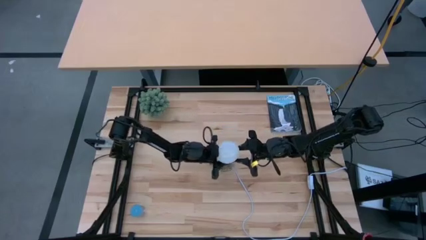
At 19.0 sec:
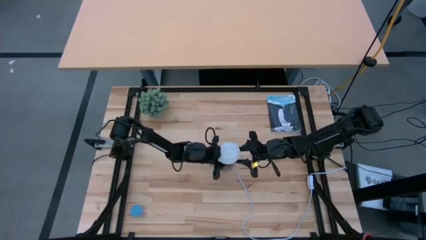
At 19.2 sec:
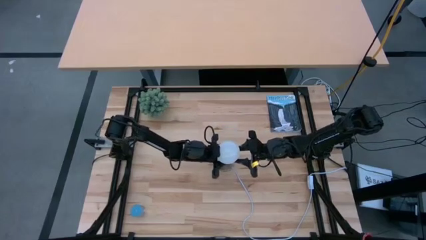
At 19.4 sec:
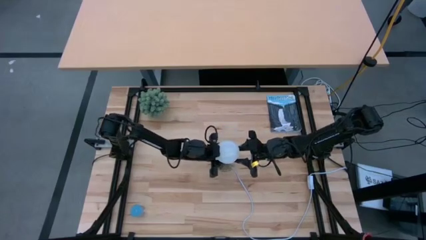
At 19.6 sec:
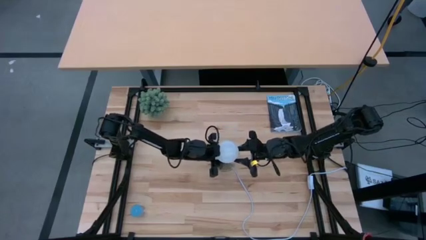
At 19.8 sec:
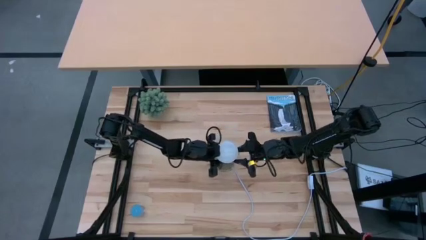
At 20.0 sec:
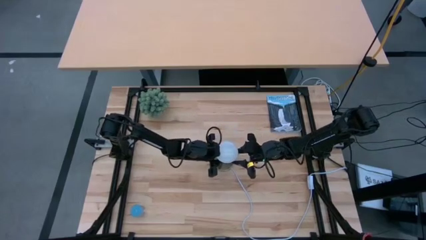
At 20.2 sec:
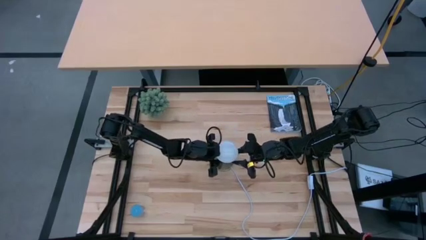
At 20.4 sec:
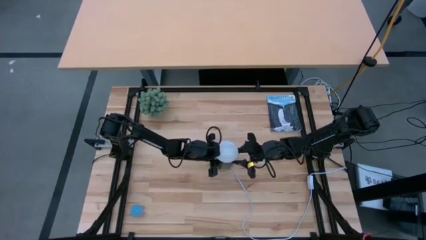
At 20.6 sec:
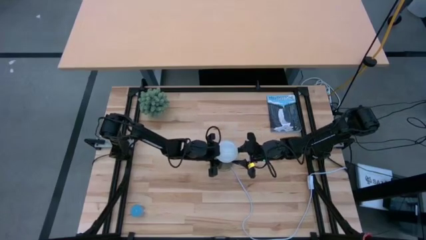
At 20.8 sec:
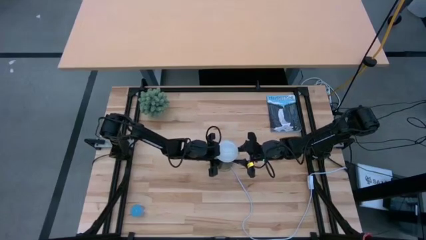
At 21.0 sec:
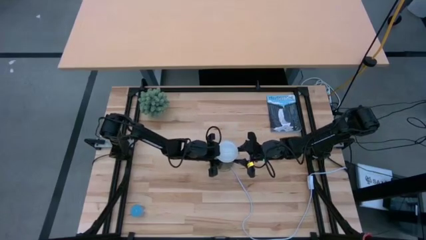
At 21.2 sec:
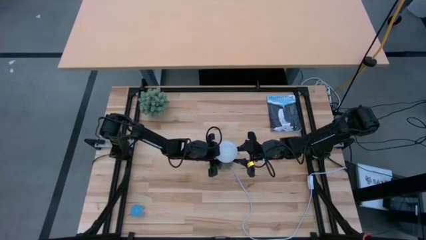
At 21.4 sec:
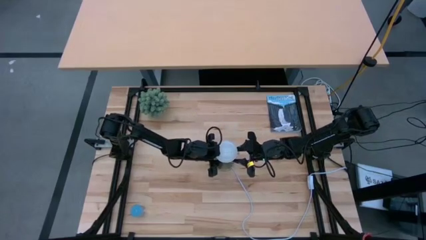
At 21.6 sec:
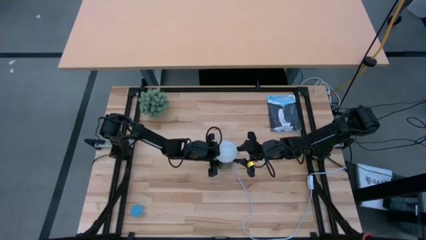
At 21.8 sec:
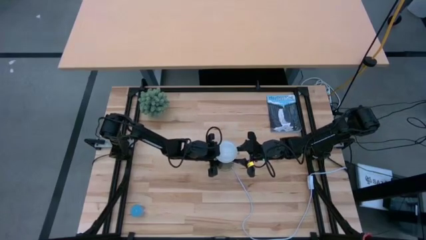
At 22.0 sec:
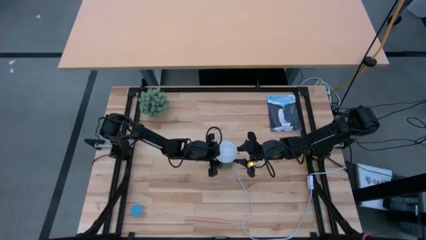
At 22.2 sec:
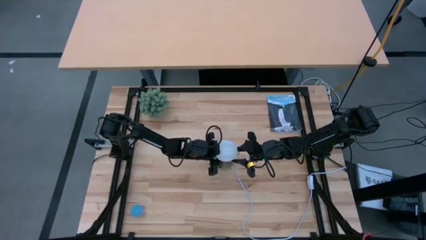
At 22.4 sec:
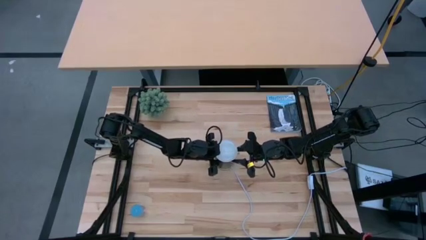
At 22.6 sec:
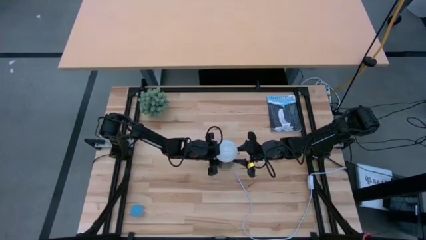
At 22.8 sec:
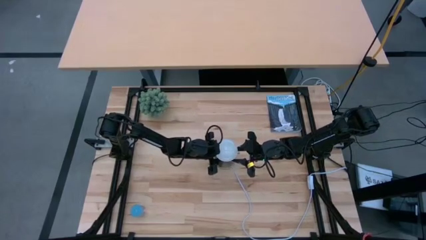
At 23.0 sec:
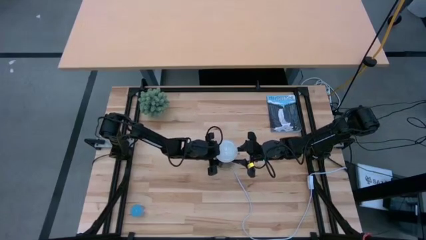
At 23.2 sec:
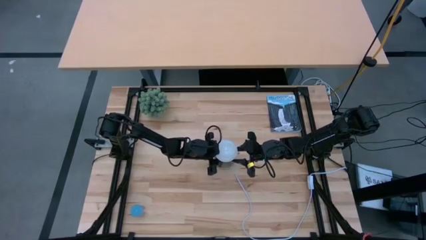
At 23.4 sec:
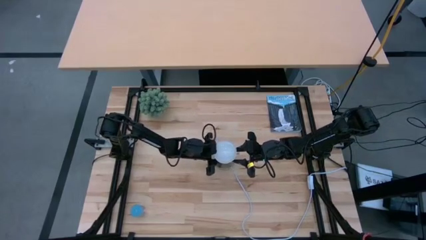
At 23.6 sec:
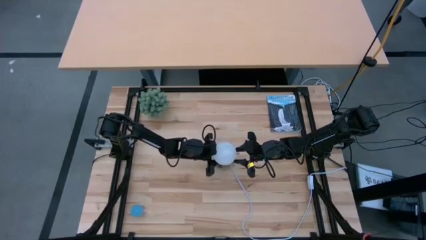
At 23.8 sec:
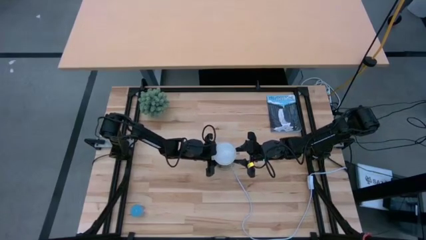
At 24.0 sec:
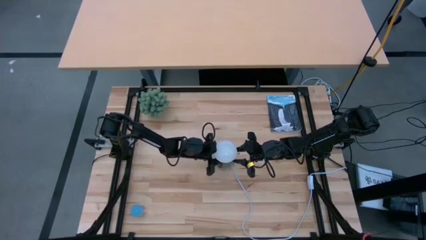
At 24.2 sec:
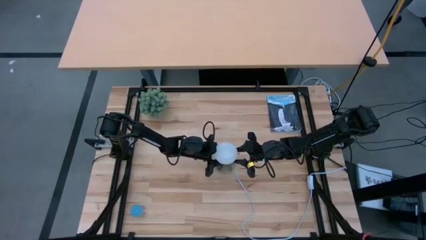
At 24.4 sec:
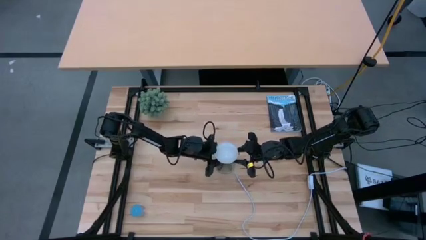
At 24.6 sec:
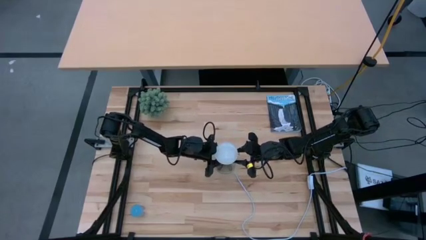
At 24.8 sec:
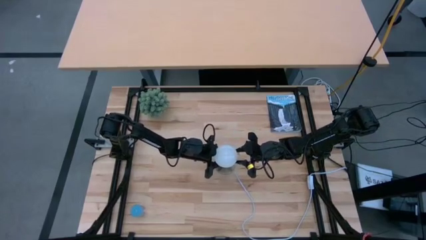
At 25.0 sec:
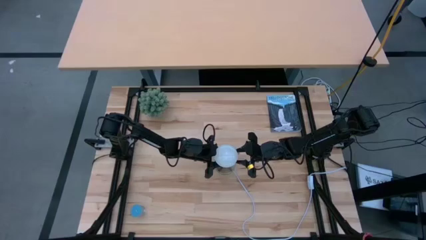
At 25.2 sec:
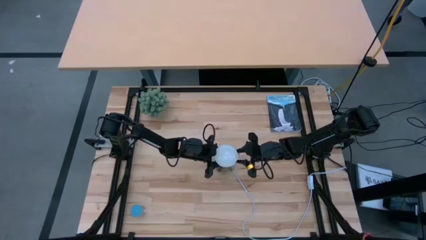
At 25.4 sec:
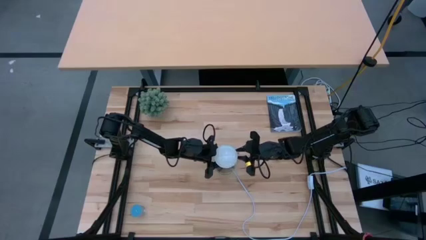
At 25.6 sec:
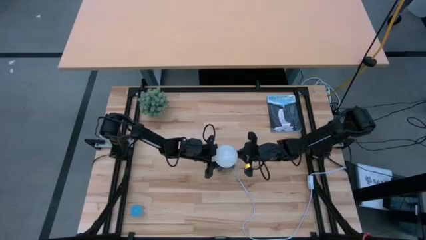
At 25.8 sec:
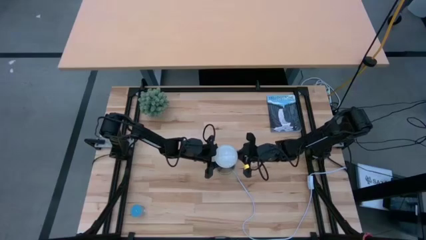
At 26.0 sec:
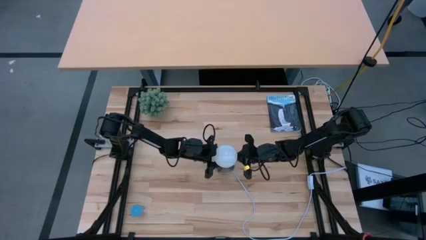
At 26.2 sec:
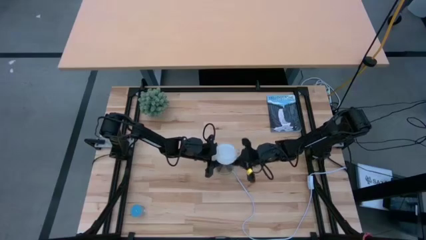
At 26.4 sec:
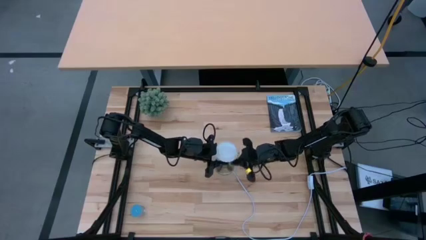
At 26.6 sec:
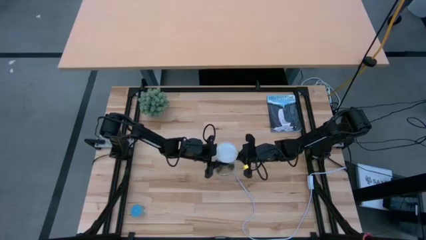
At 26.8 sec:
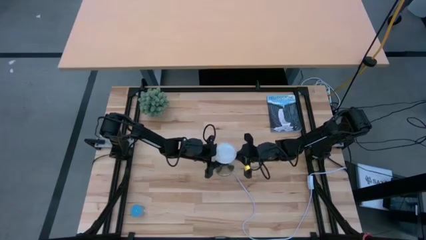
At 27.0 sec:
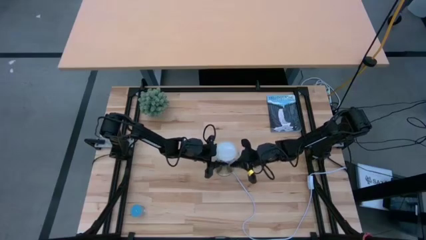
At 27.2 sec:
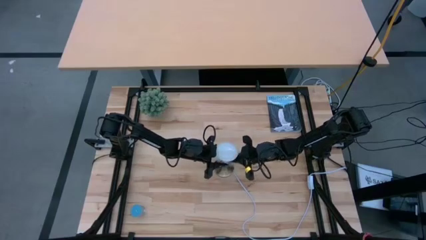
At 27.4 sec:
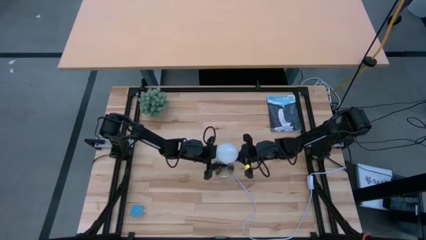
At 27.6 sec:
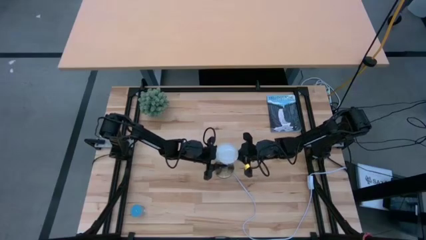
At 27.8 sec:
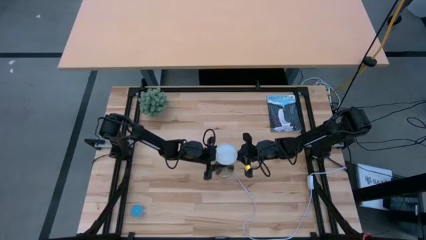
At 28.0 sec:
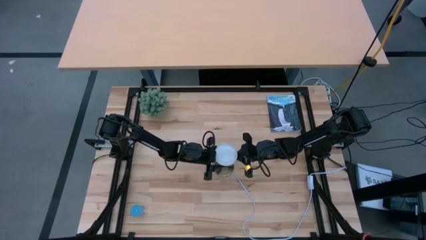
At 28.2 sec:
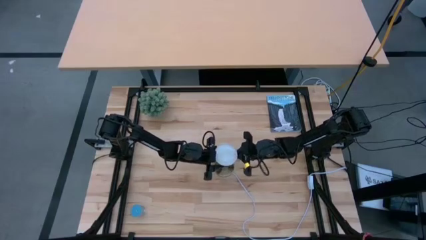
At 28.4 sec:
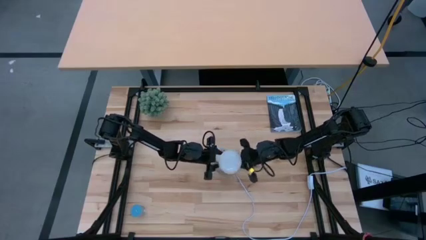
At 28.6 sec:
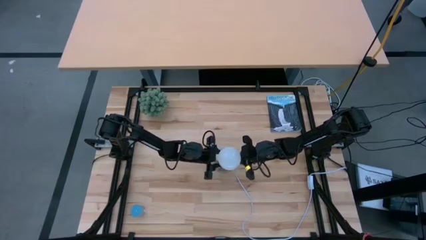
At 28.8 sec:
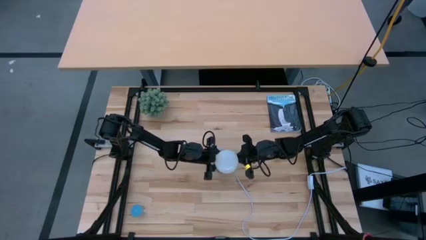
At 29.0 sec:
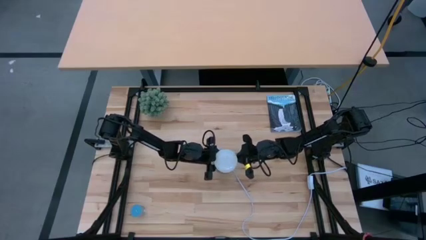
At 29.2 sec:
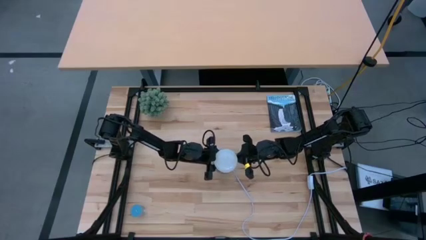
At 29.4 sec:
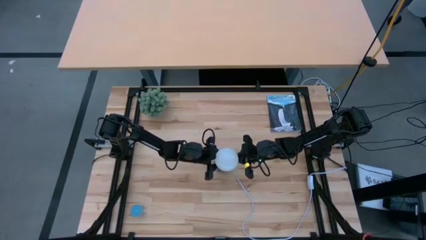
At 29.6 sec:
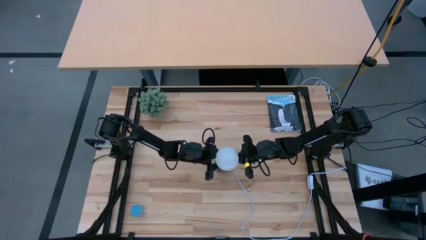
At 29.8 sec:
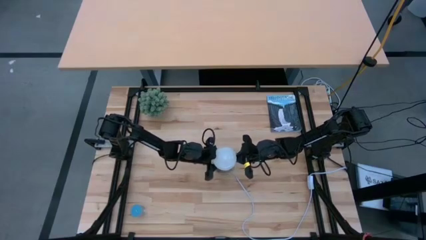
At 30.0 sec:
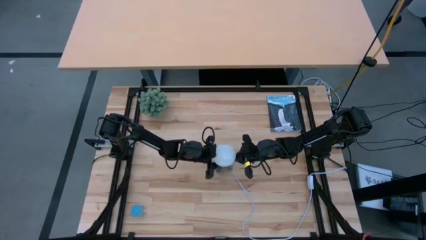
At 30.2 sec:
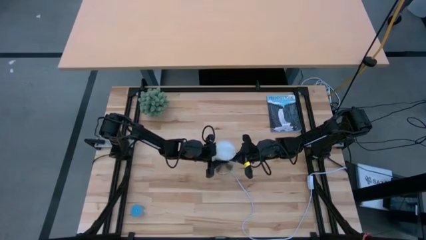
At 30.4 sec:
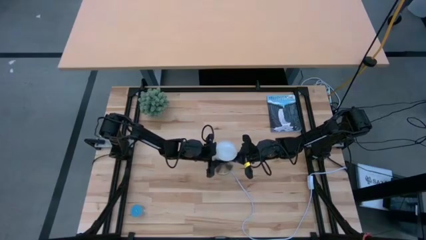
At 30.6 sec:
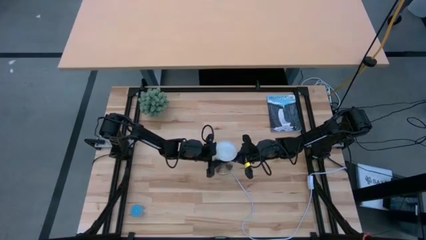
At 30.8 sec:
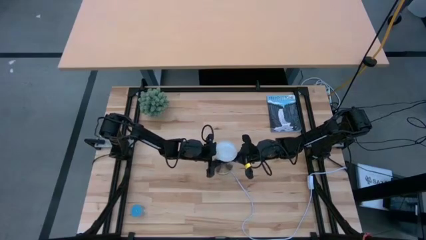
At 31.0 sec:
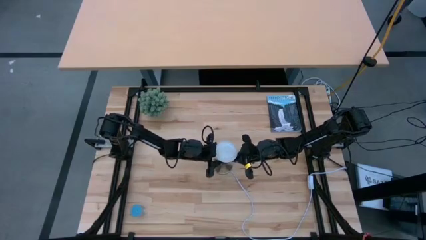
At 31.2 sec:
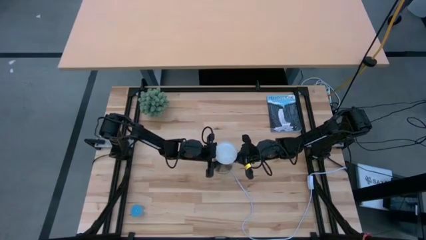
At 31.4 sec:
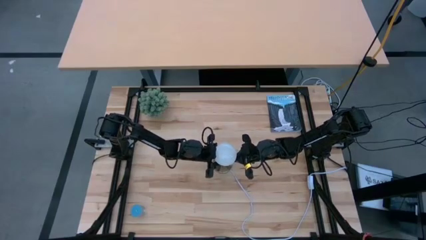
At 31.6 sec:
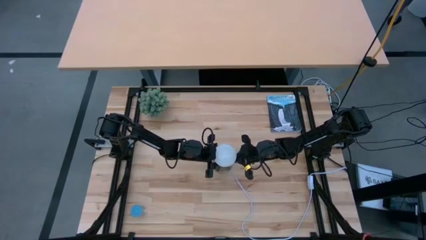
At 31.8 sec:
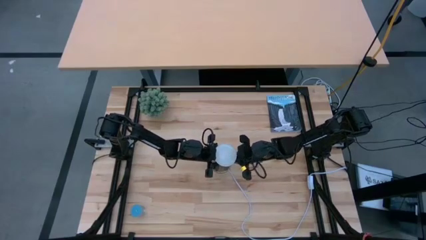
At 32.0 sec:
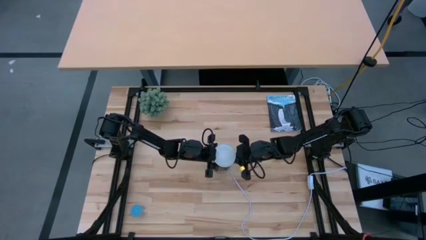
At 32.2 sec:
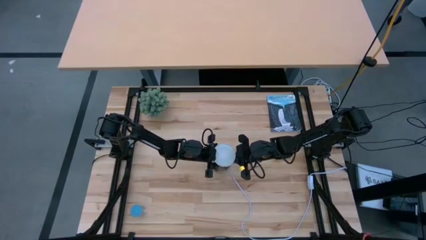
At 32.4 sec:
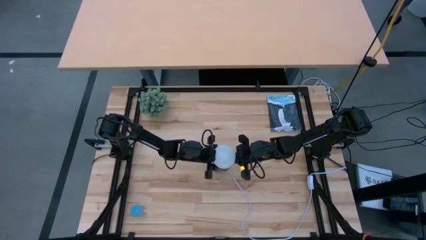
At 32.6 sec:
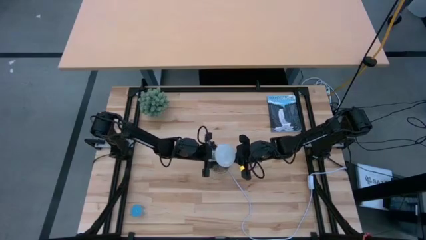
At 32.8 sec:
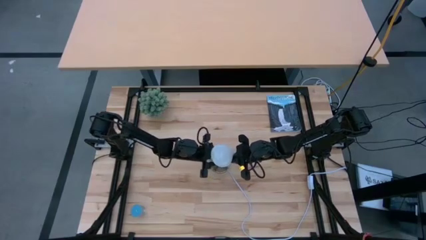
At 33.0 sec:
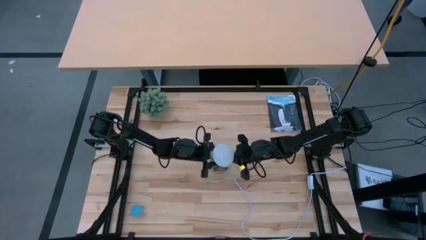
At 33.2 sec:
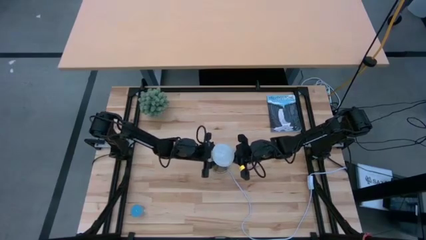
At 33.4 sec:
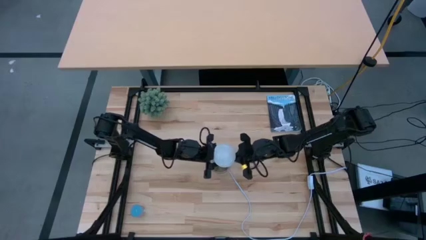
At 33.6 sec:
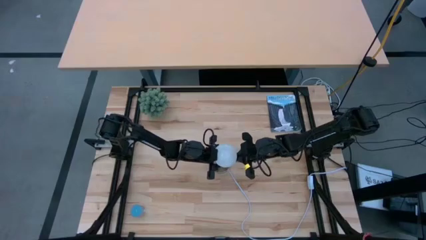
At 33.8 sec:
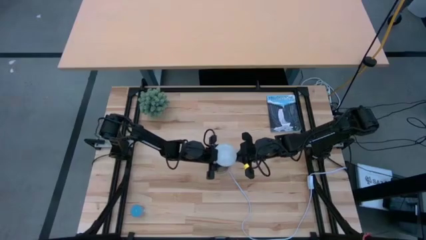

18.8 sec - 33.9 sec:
Task: Screw lightbulb
Insert the lightbulb into the lamp

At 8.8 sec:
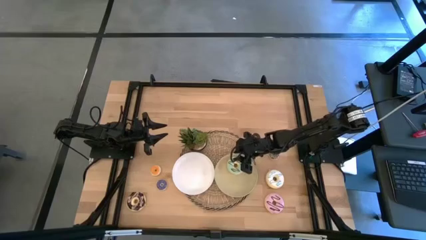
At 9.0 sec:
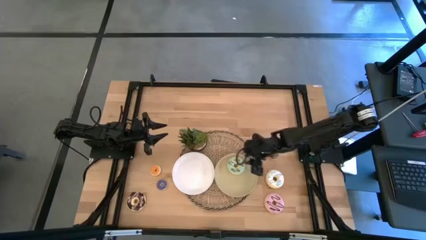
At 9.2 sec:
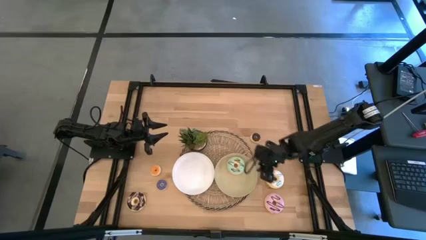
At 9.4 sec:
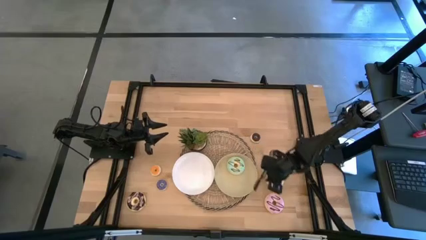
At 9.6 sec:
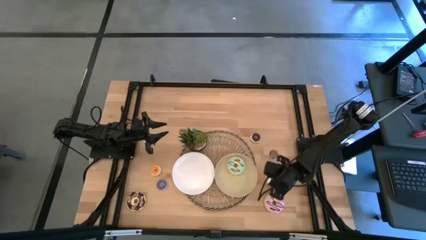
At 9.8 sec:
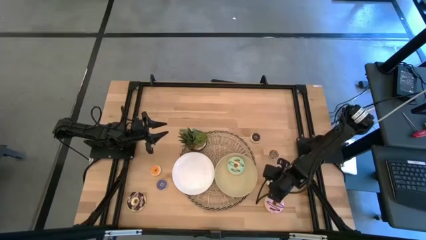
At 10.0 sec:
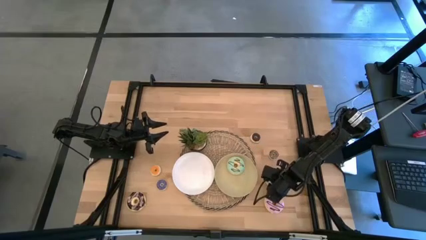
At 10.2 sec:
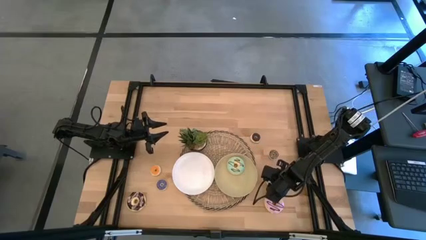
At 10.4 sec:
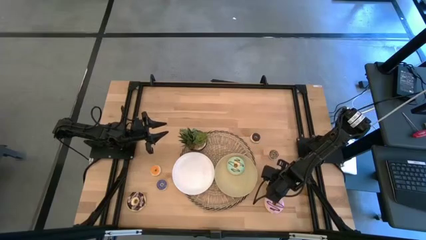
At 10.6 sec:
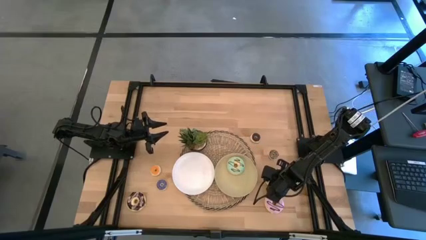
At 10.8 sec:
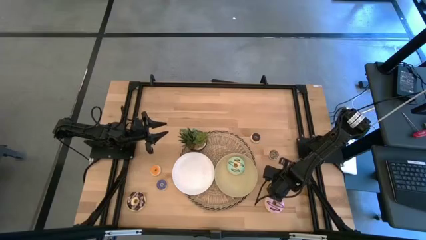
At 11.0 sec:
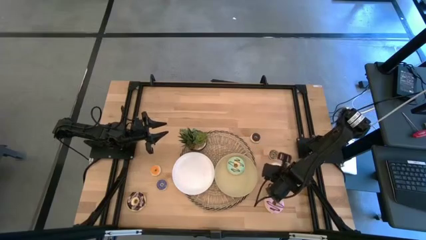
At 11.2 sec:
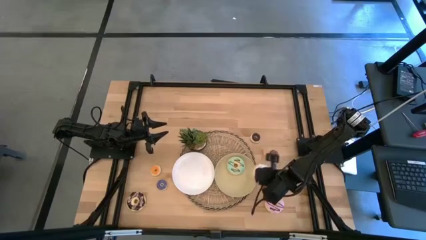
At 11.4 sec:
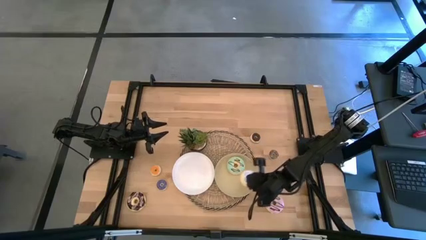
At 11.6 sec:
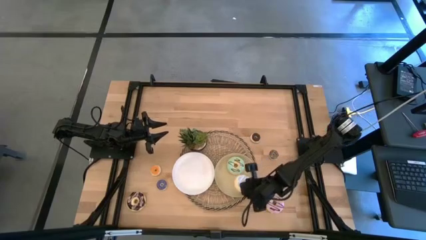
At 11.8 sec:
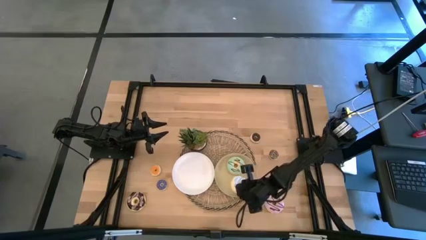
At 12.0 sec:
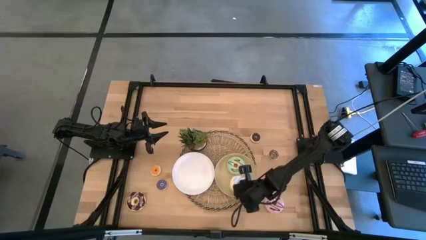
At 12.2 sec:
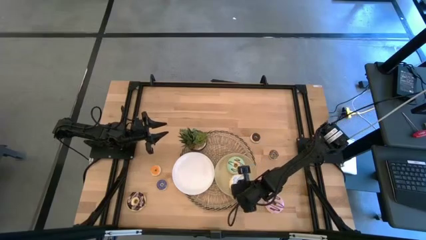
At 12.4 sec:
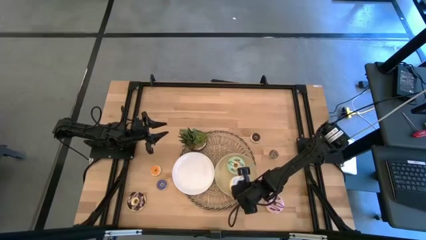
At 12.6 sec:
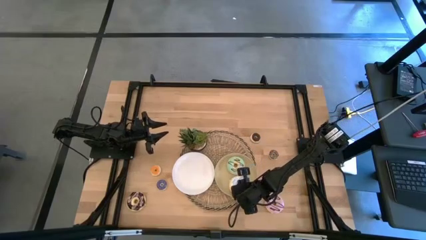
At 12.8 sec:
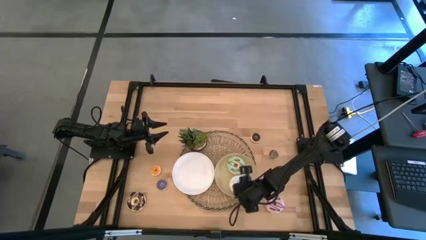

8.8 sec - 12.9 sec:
Task: Pick & Place donuts
Put the big white donut on the brown plate
